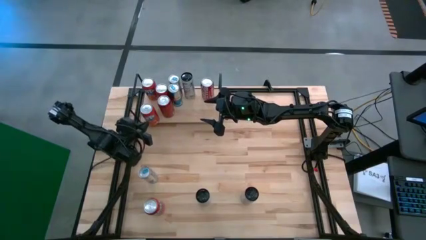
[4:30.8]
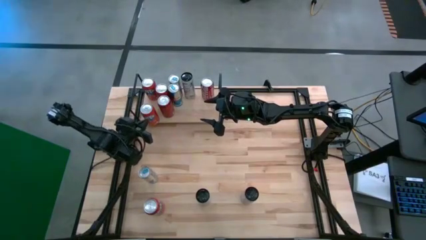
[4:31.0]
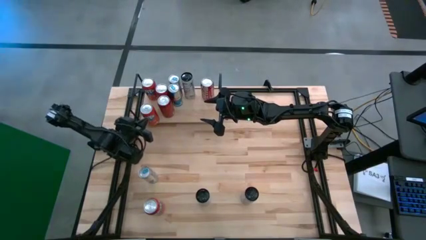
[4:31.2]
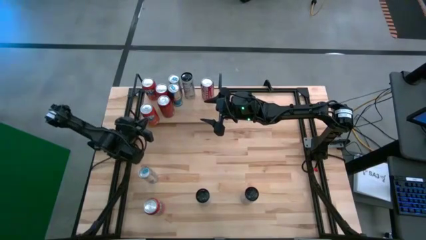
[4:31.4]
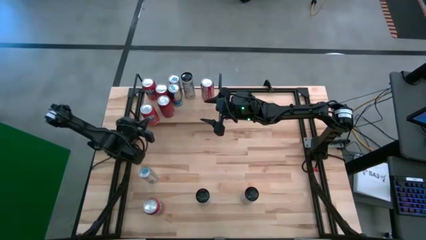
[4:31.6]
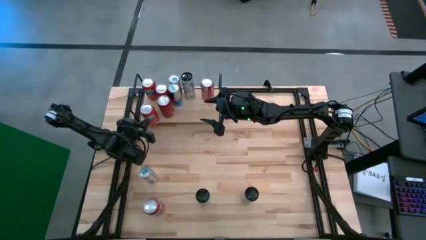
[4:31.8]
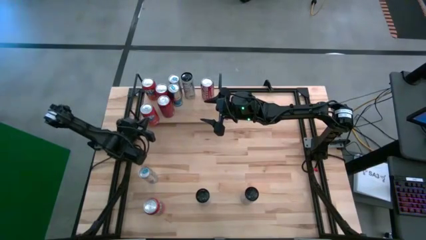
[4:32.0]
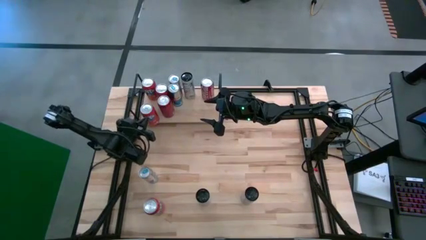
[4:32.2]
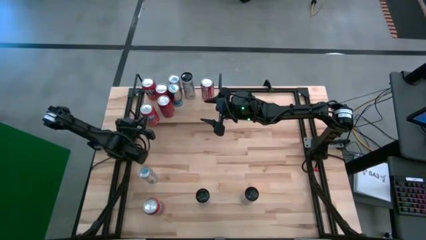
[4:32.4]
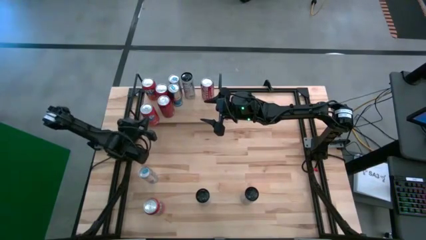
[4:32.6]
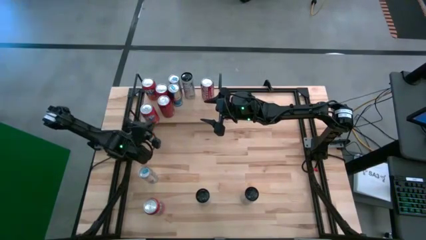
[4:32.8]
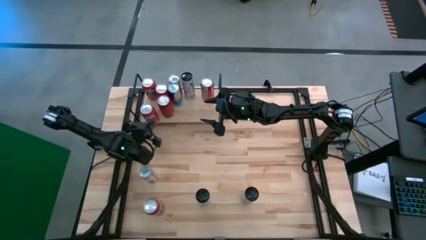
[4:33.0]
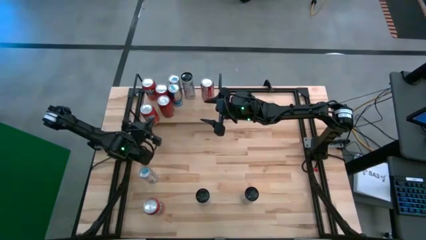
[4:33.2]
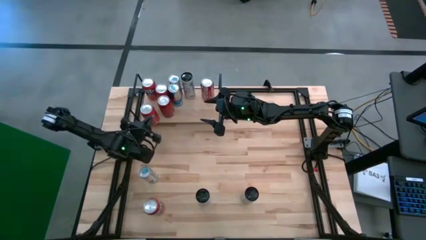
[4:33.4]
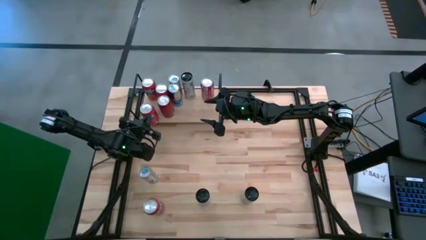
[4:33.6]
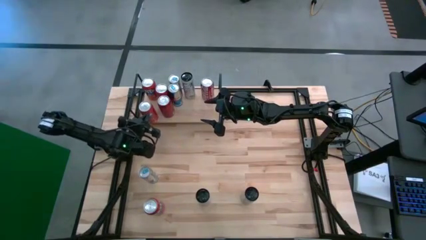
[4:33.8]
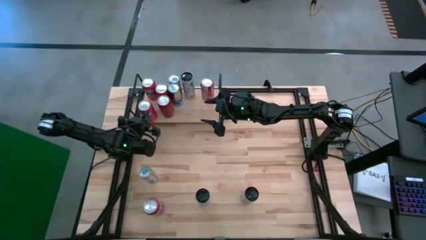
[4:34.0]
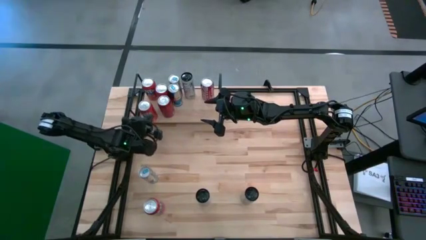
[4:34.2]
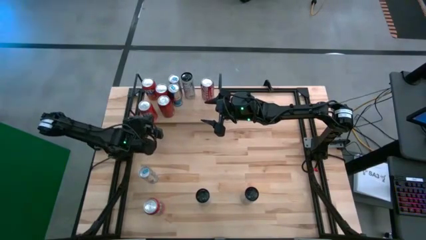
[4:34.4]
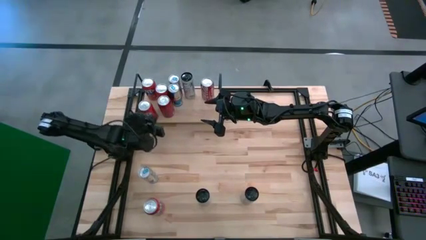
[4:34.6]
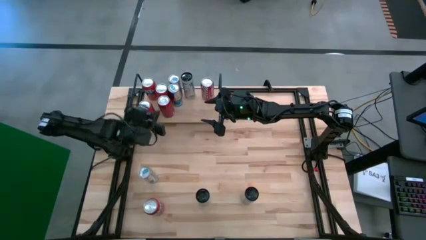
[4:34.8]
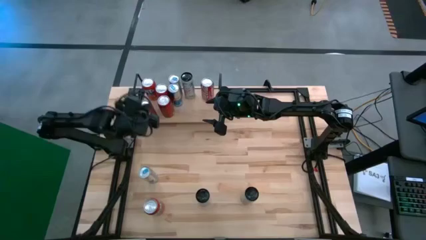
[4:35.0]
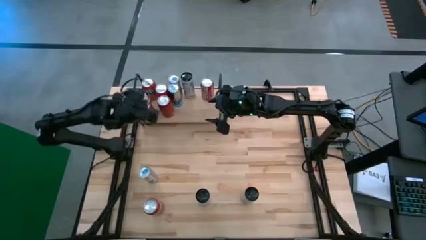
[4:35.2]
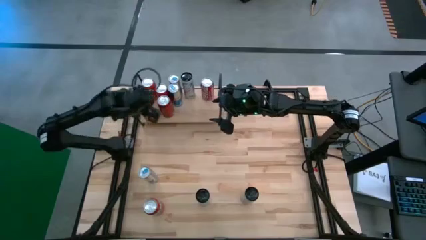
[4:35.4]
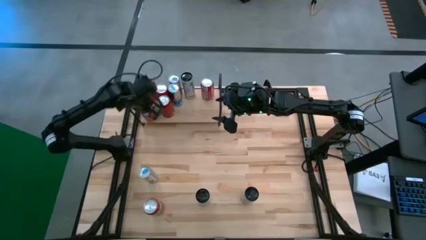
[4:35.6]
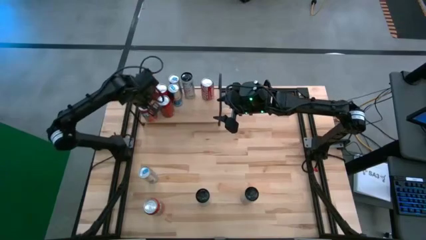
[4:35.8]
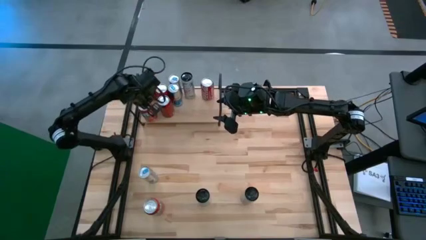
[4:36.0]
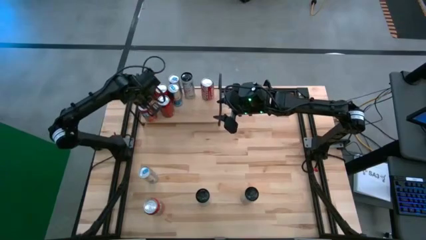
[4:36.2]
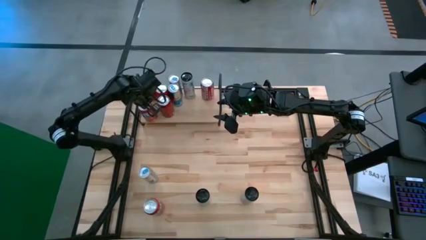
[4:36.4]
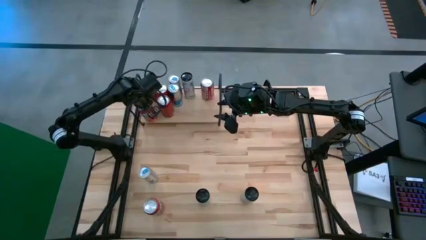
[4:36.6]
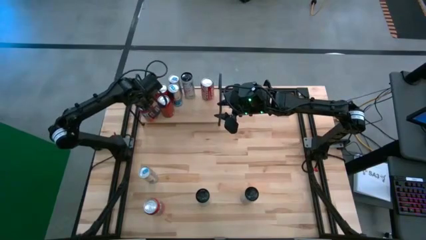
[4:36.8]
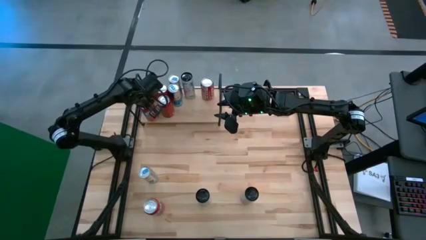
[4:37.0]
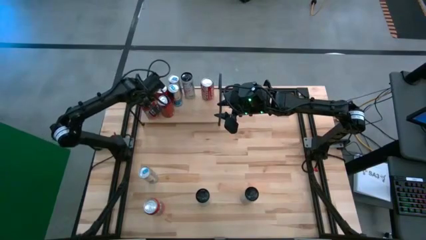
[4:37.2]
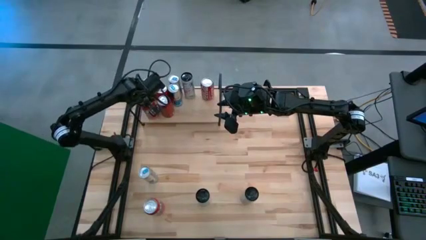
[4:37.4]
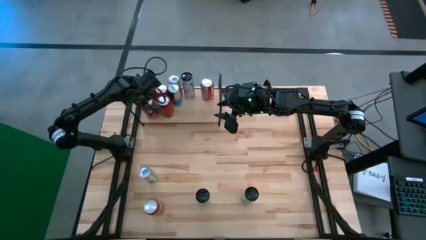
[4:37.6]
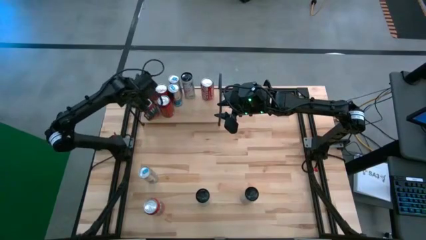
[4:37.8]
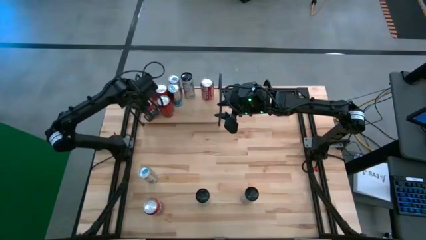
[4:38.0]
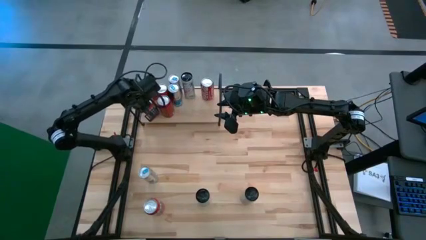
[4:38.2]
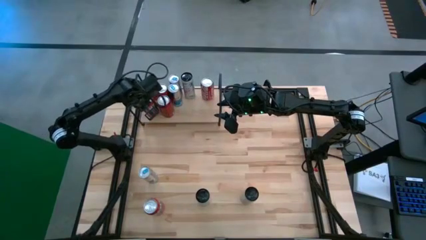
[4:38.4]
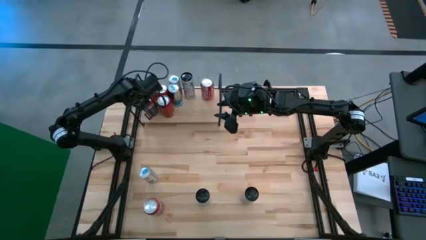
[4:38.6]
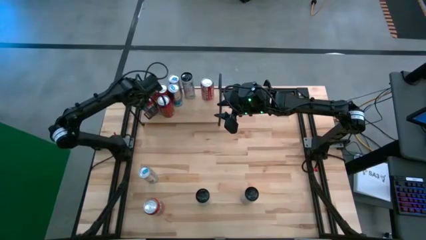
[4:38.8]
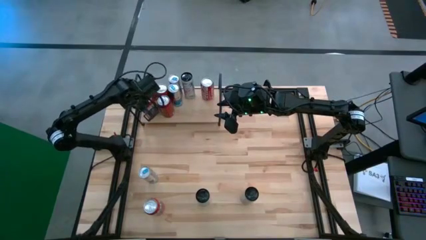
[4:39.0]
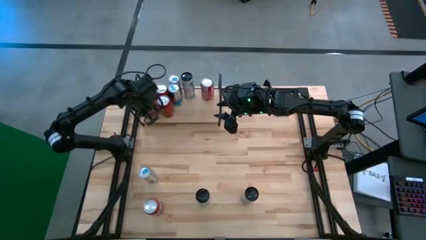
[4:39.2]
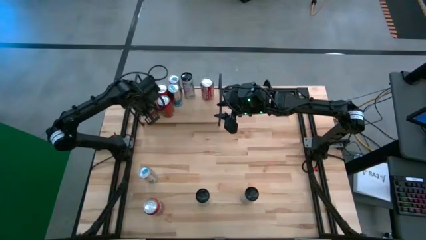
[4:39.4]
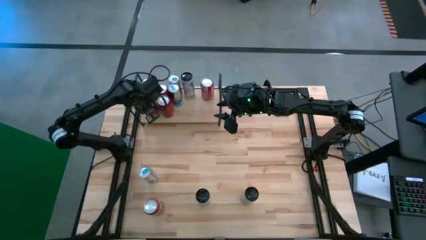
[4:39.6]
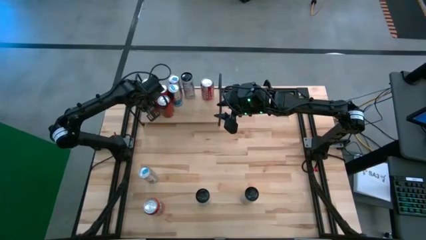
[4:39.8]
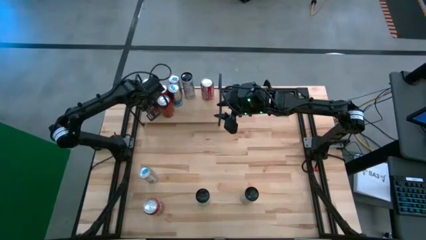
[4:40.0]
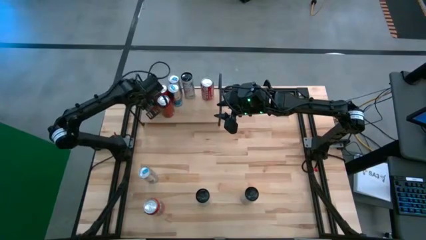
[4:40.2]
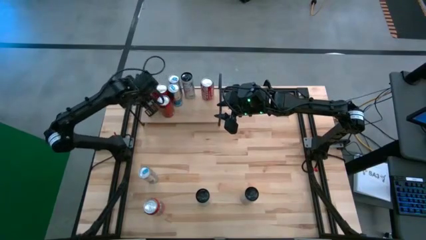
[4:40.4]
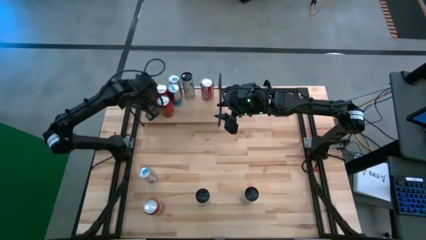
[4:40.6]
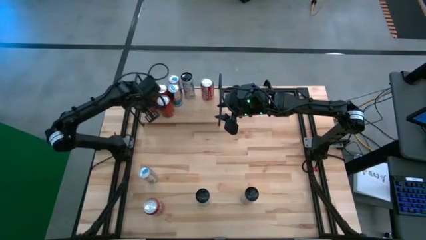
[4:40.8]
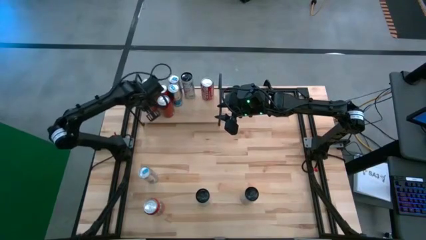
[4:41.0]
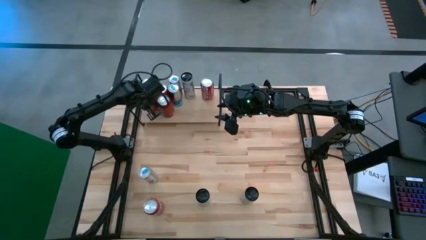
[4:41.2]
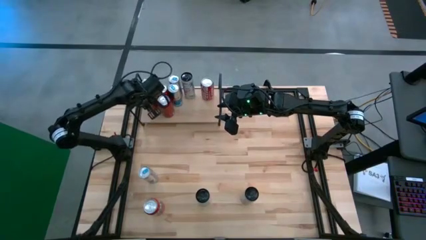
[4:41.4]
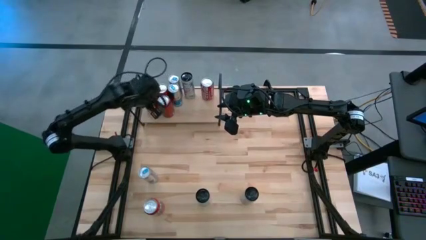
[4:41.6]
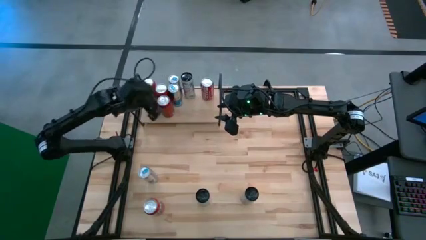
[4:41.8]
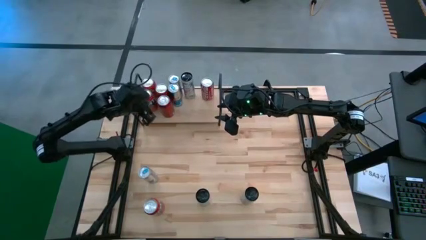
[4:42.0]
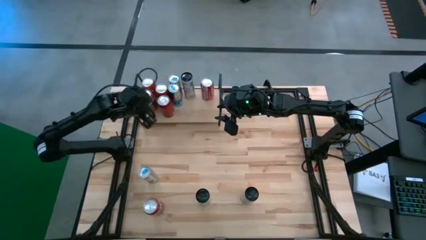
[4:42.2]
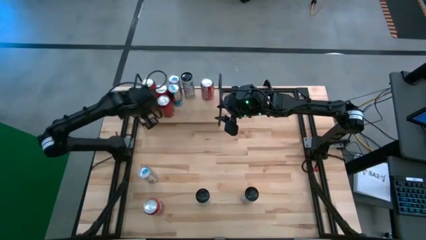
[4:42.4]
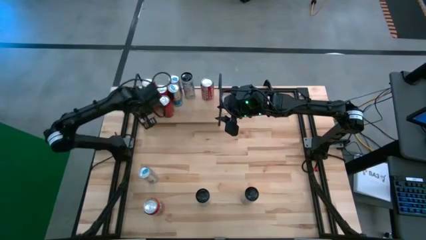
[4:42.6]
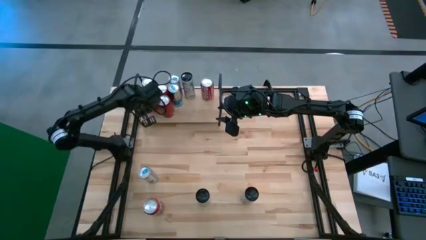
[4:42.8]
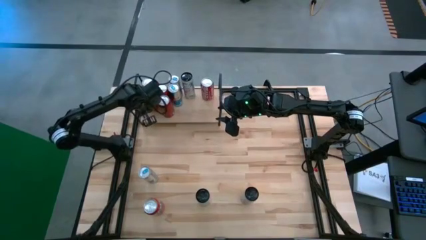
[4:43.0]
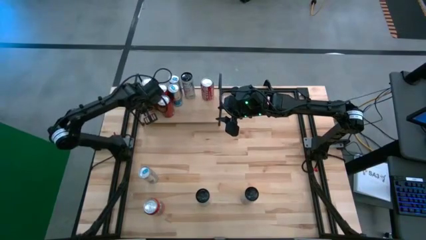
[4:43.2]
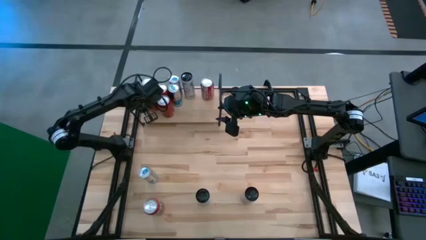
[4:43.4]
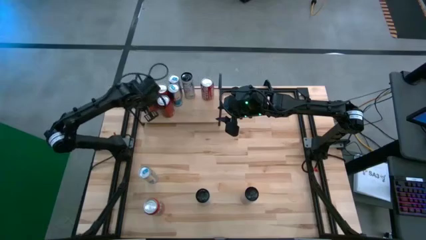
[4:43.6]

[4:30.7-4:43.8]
Task: Place canned beverage on shelf
Put the top orange soda can on the shelf aligned with the other orange soda can
